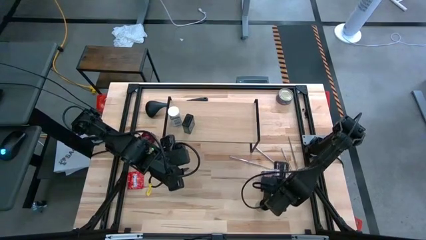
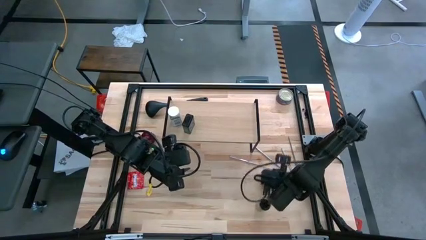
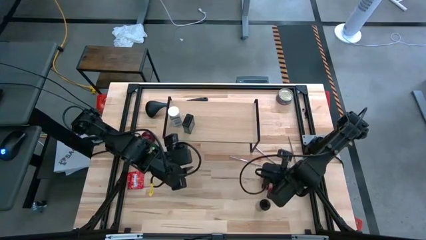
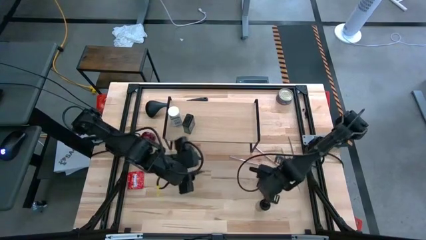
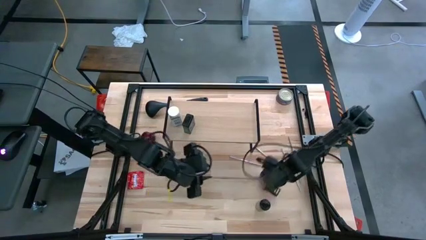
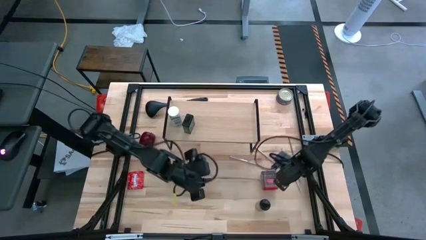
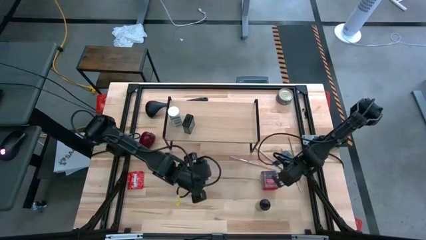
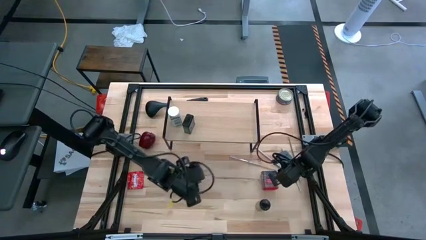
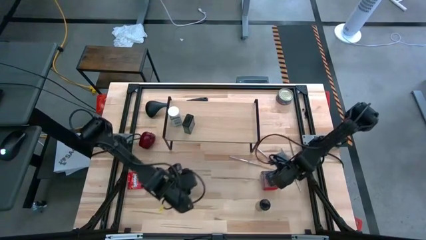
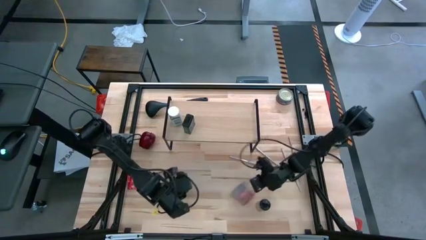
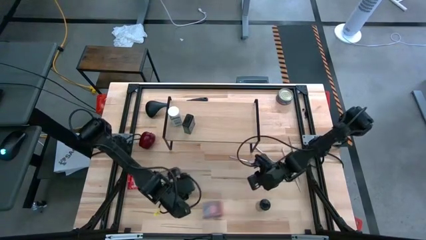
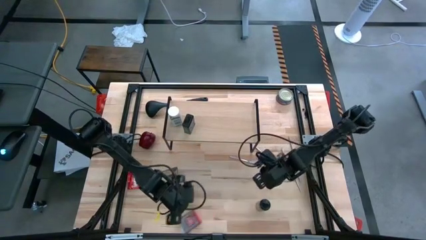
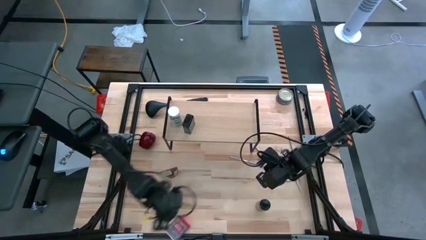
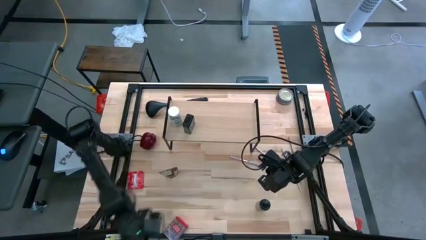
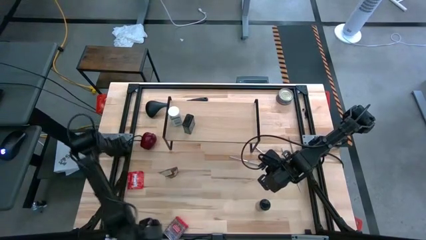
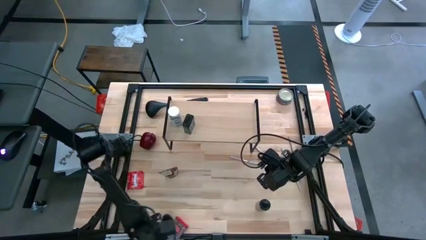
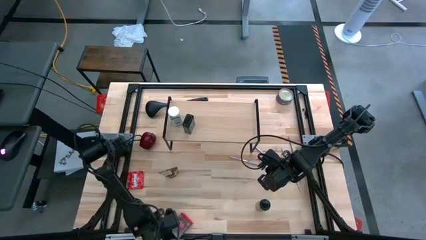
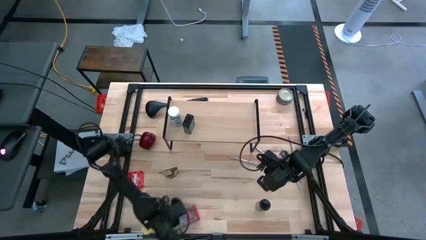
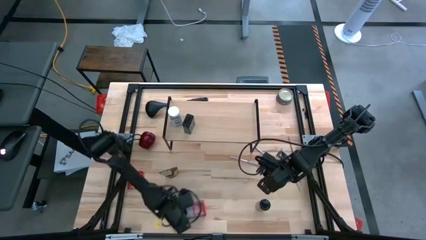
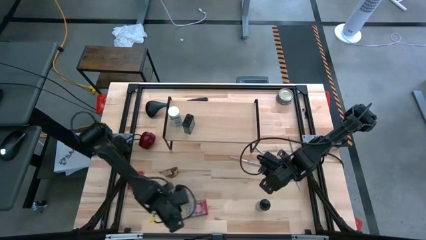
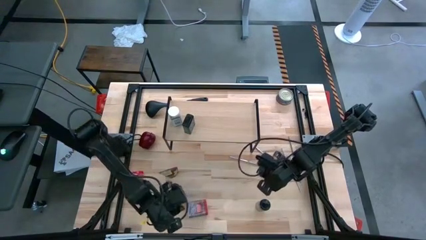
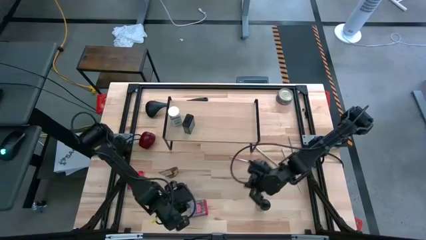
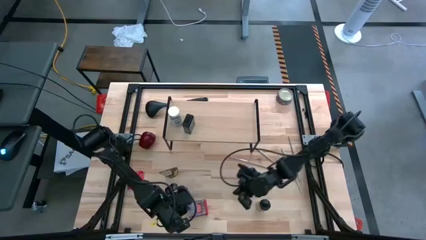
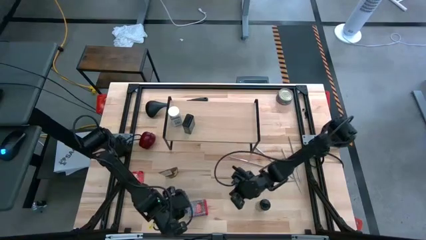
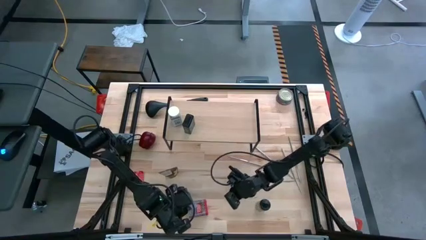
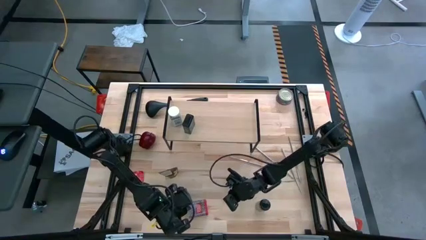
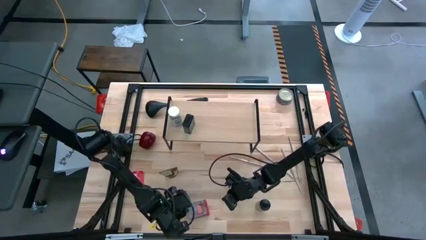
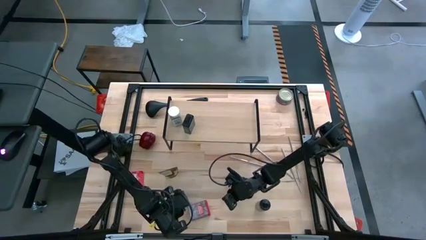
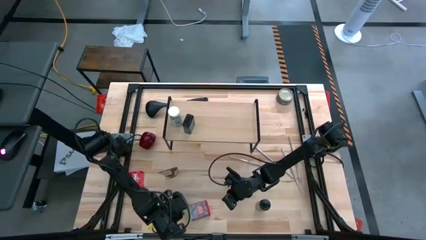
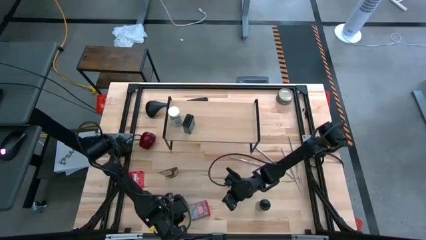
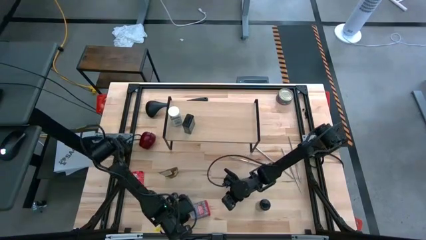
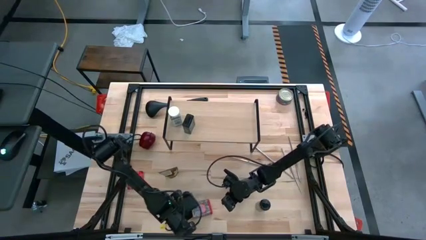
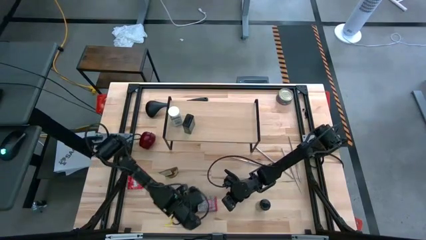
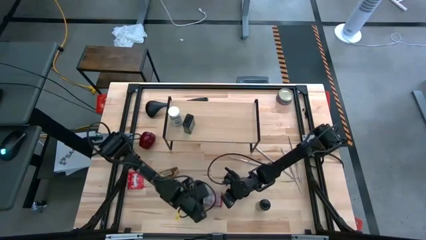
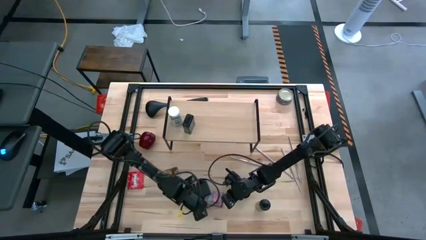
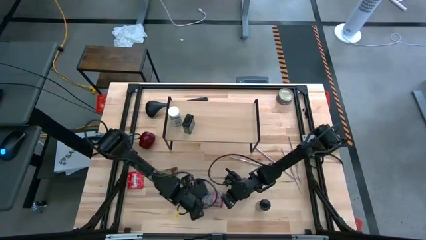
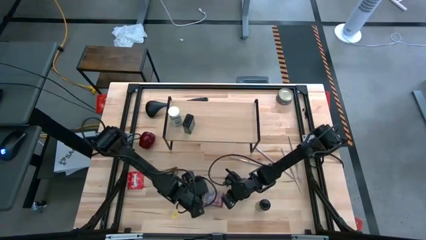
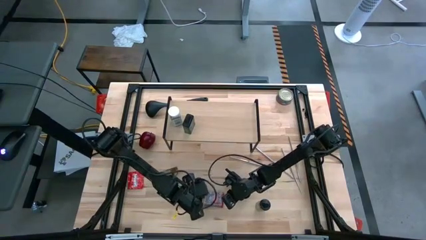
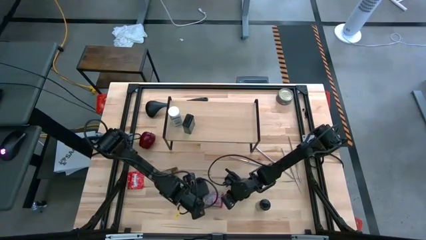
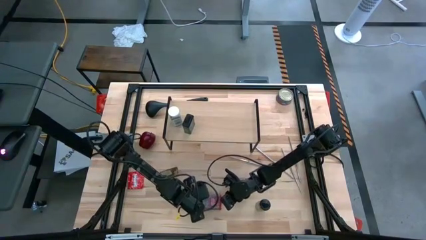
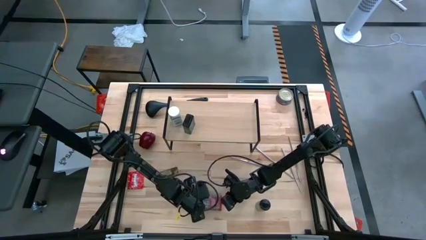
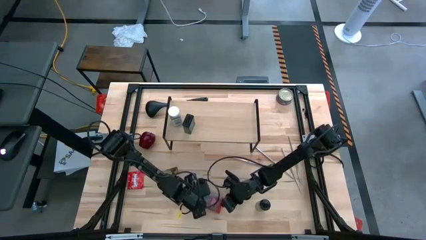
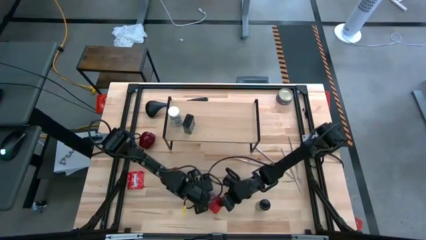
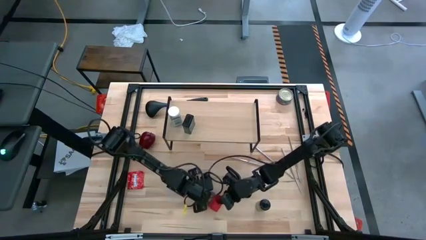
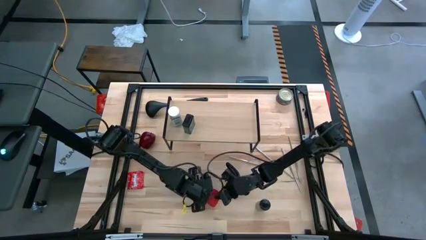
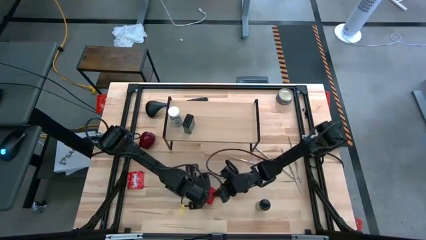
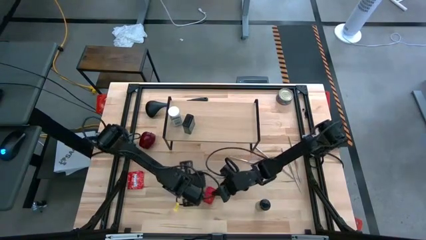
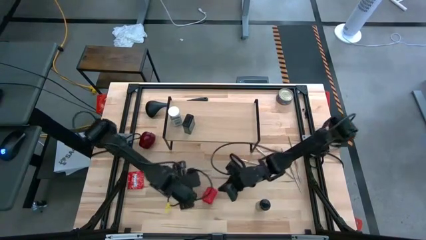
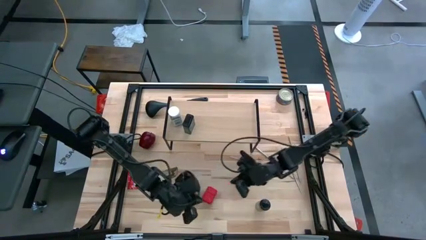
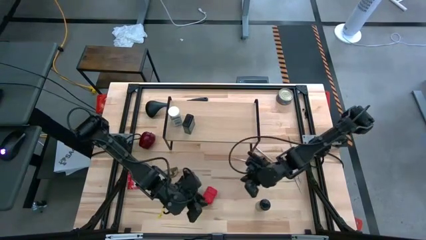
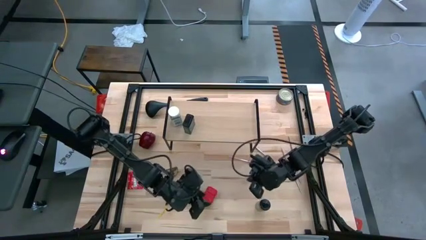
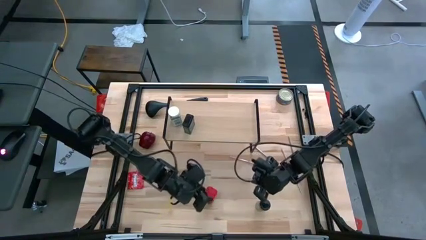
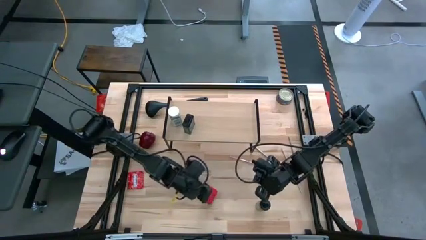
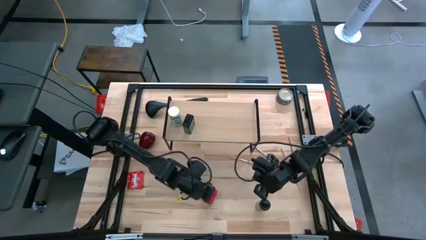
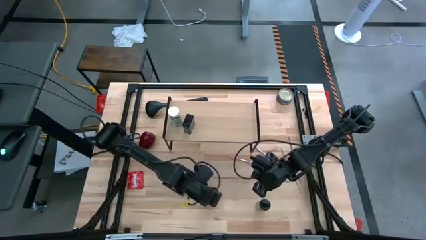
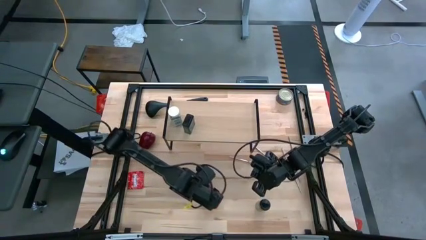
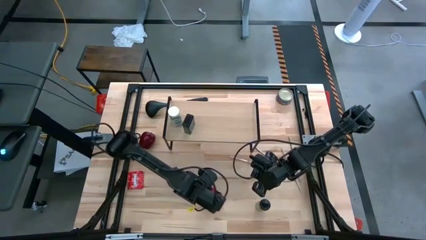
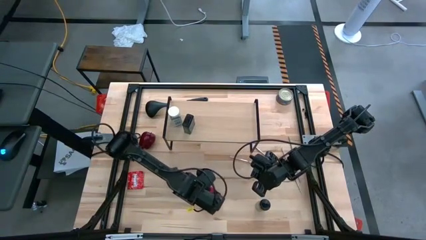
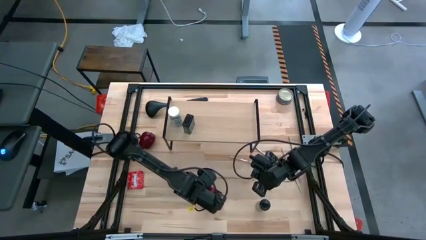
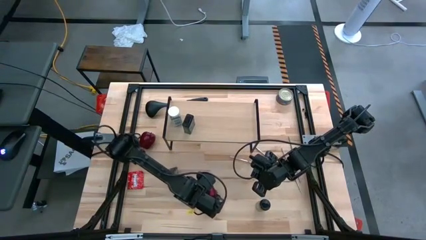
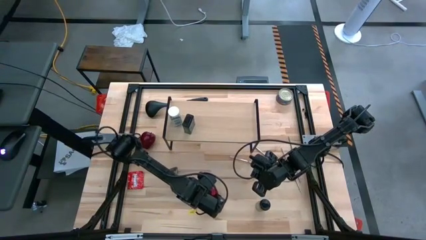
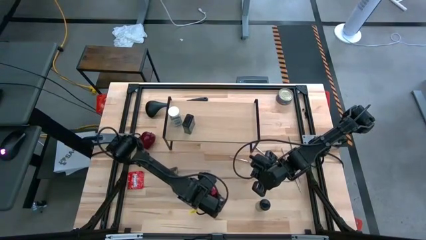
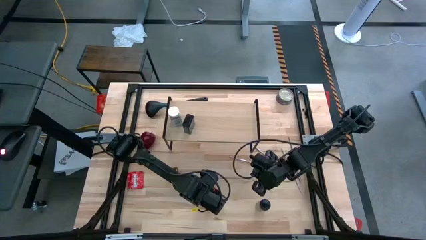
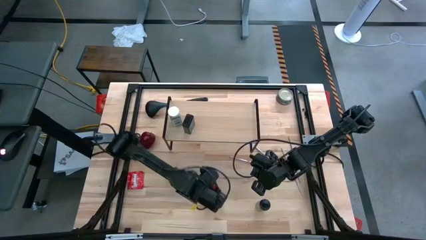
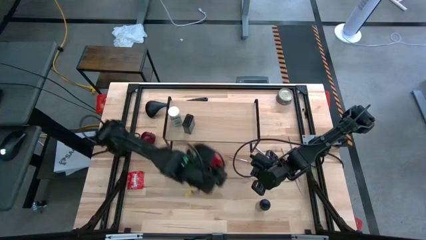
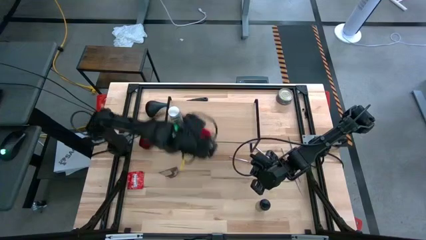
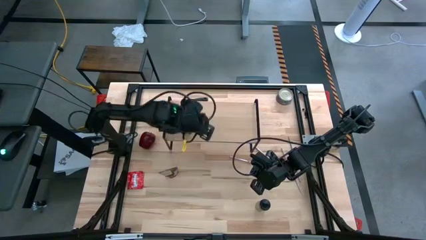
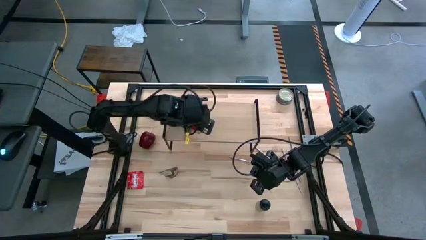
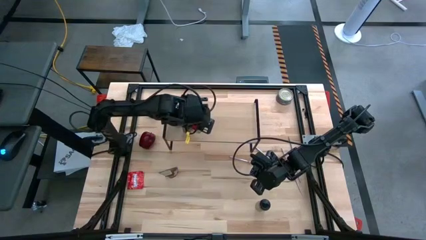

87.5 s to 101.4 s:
Task: Shelf spices
Put the red seasoning can on the shelf
